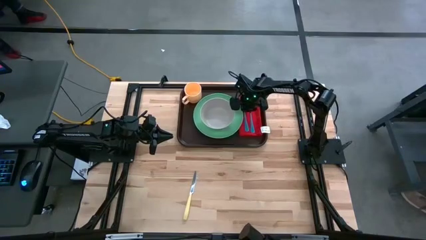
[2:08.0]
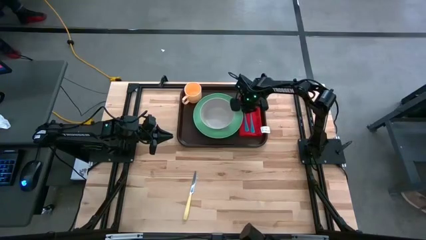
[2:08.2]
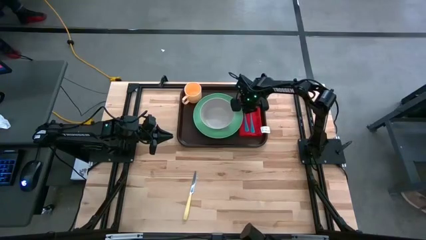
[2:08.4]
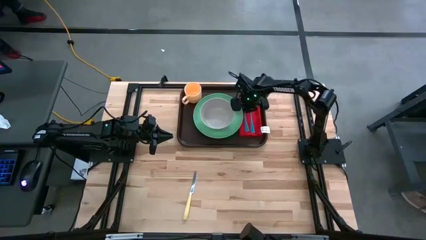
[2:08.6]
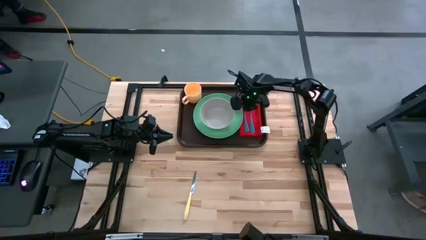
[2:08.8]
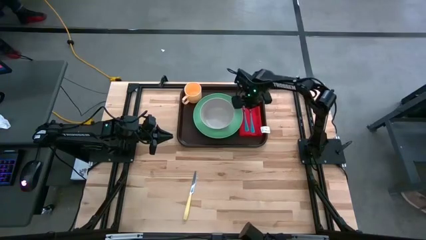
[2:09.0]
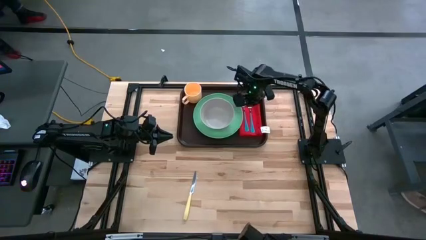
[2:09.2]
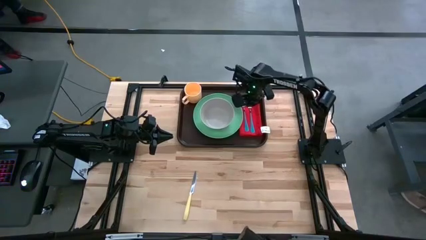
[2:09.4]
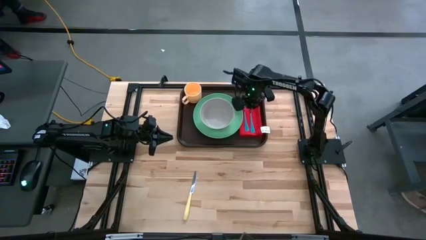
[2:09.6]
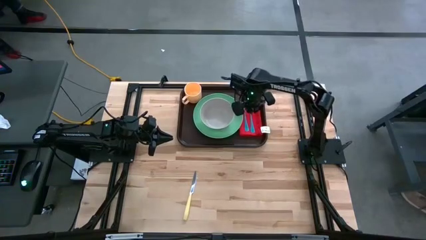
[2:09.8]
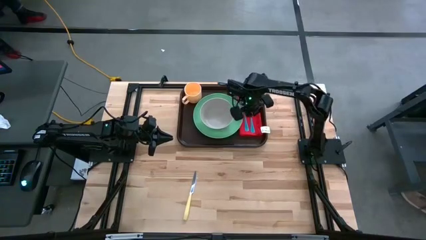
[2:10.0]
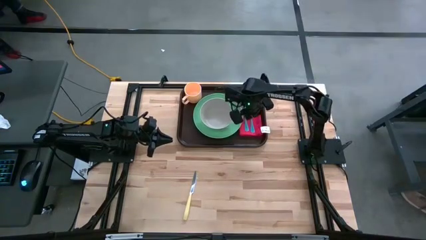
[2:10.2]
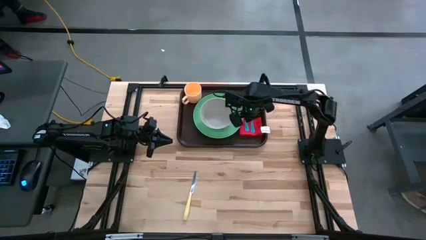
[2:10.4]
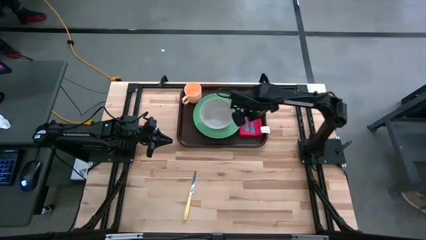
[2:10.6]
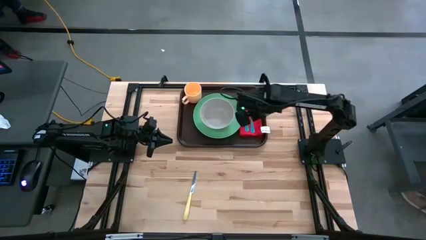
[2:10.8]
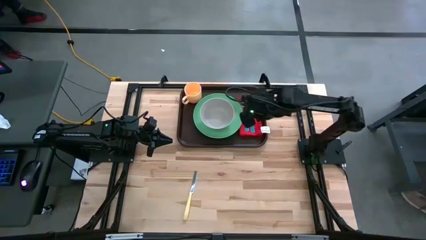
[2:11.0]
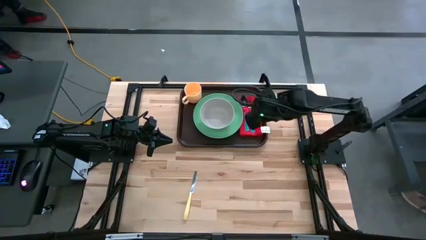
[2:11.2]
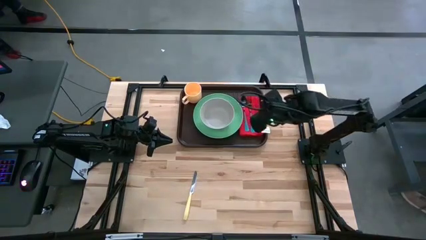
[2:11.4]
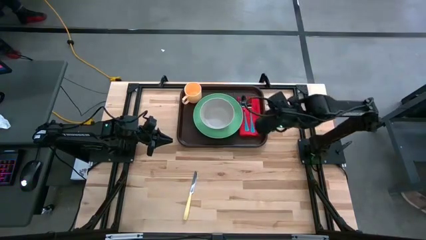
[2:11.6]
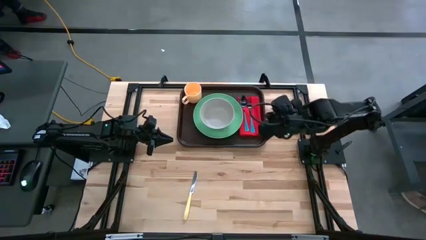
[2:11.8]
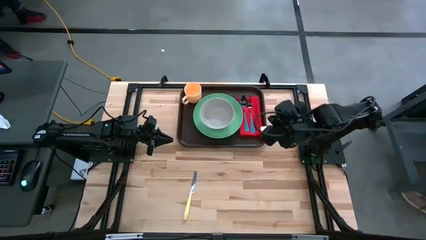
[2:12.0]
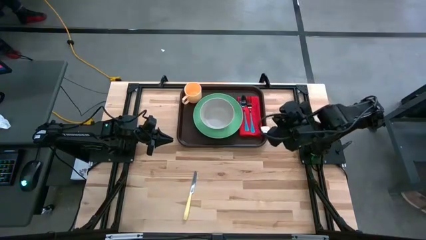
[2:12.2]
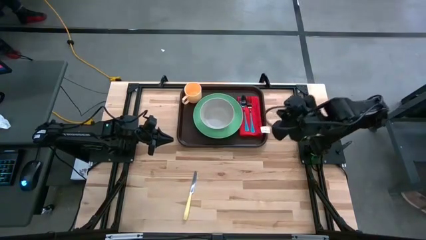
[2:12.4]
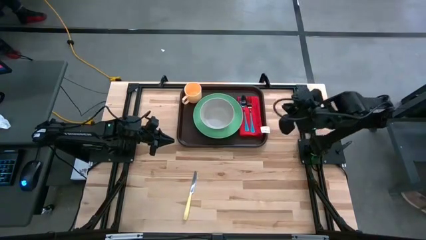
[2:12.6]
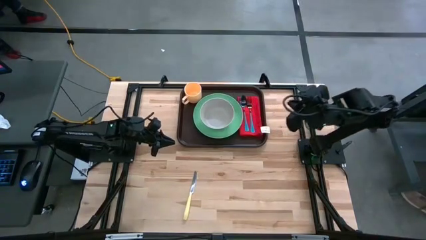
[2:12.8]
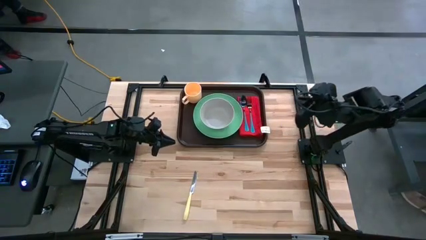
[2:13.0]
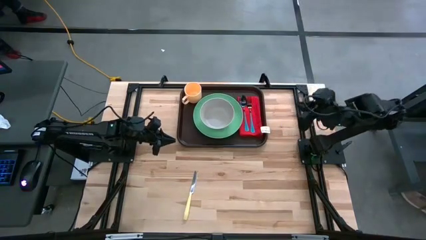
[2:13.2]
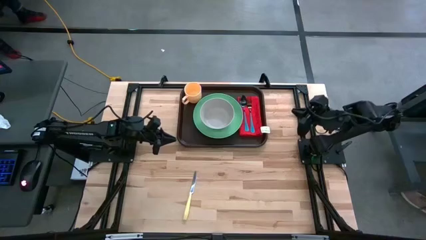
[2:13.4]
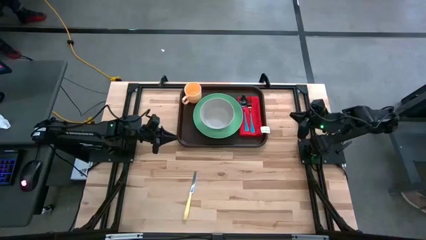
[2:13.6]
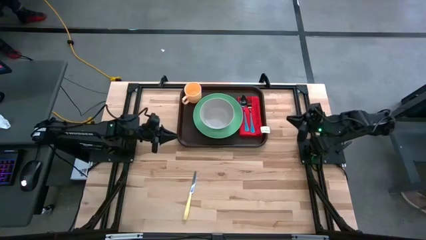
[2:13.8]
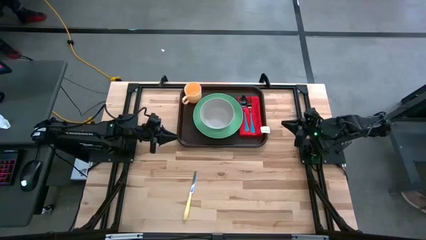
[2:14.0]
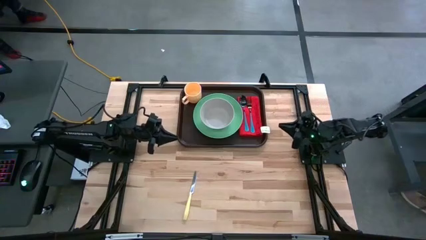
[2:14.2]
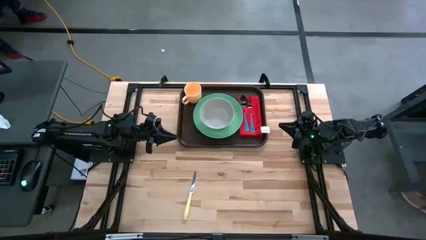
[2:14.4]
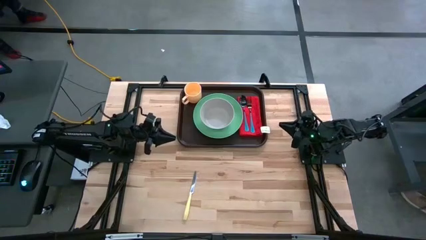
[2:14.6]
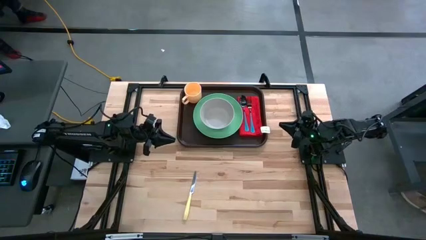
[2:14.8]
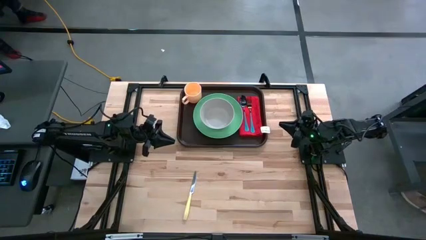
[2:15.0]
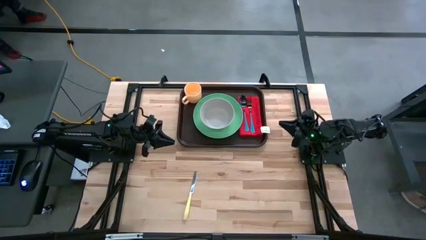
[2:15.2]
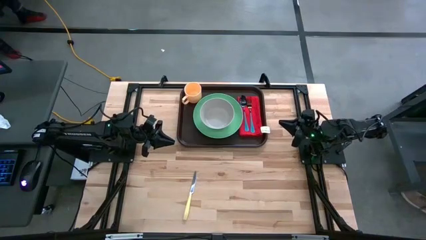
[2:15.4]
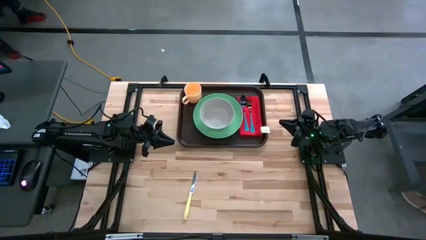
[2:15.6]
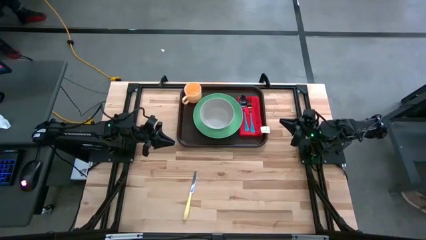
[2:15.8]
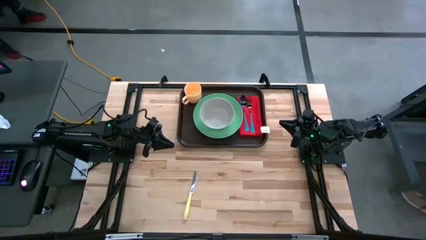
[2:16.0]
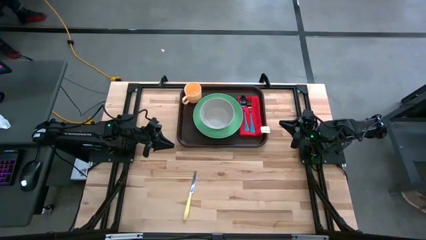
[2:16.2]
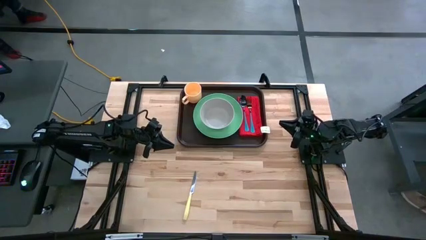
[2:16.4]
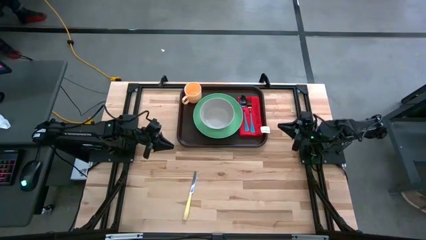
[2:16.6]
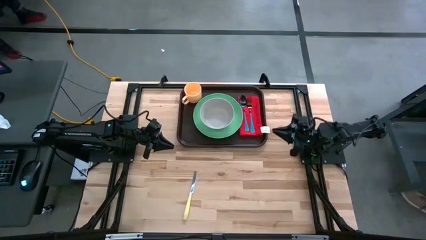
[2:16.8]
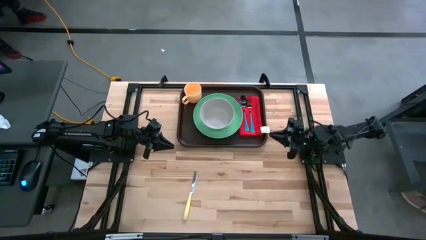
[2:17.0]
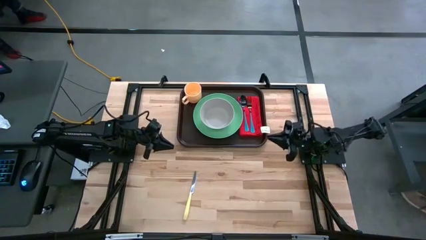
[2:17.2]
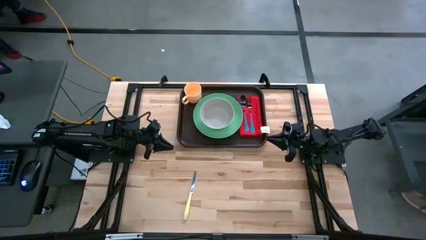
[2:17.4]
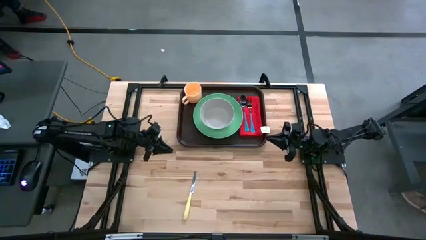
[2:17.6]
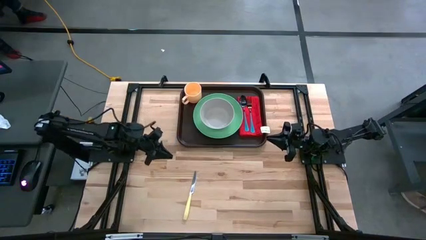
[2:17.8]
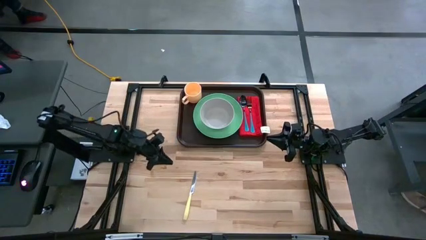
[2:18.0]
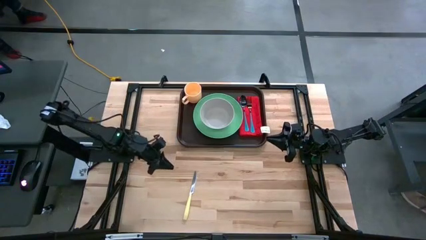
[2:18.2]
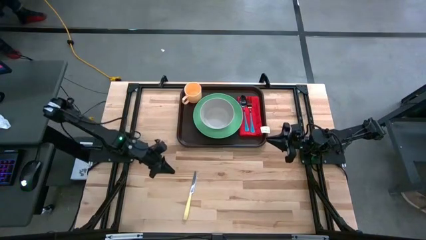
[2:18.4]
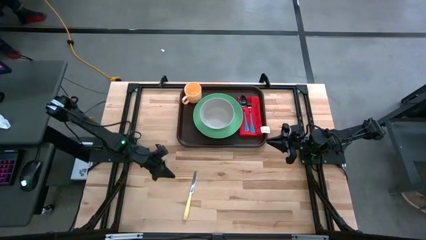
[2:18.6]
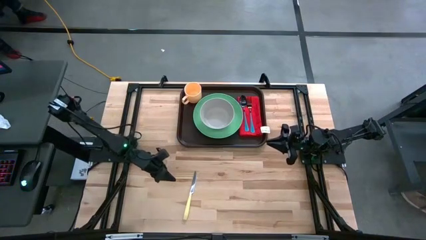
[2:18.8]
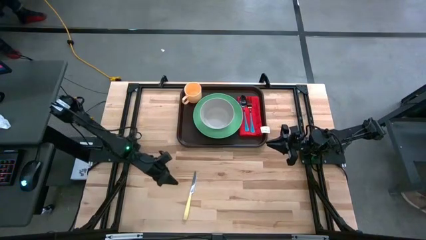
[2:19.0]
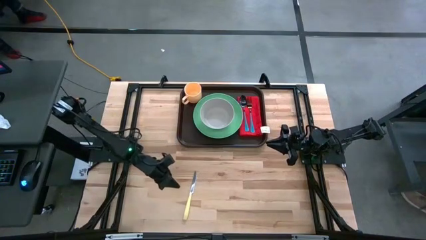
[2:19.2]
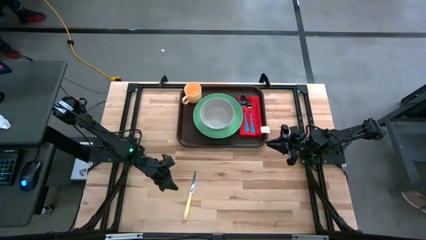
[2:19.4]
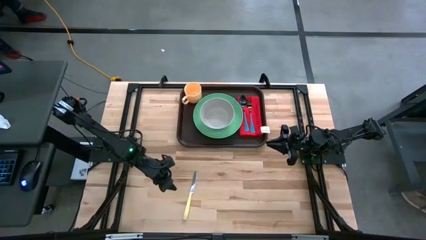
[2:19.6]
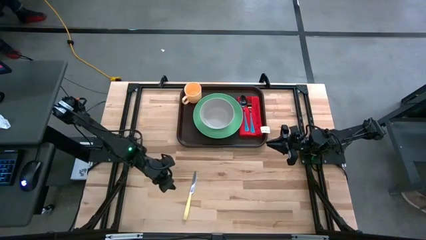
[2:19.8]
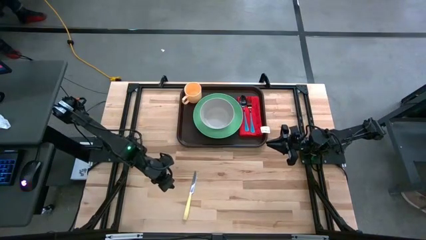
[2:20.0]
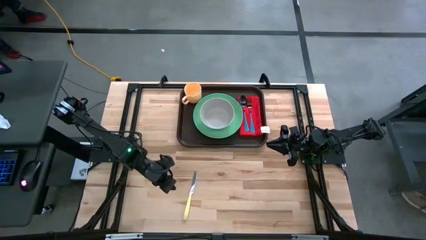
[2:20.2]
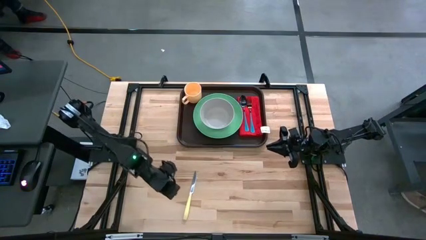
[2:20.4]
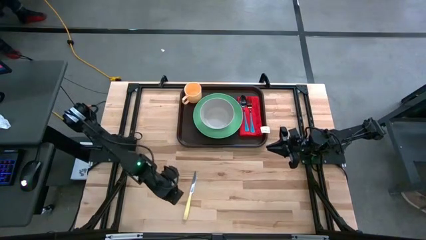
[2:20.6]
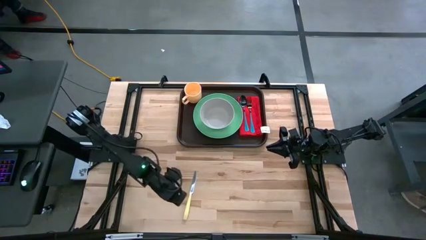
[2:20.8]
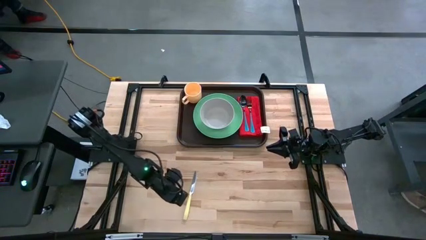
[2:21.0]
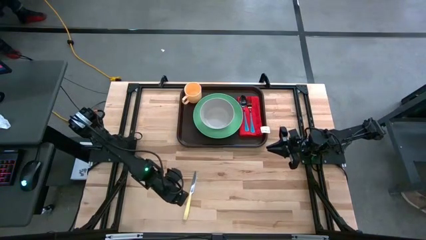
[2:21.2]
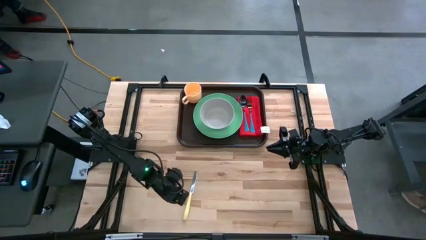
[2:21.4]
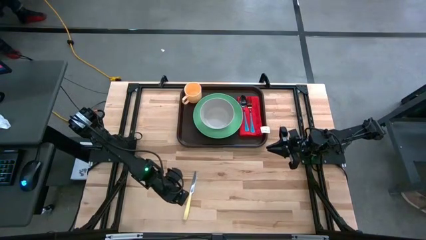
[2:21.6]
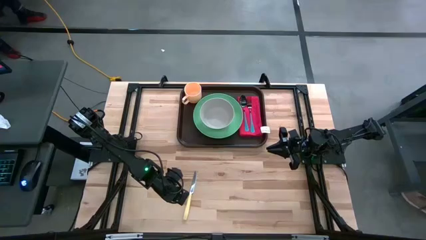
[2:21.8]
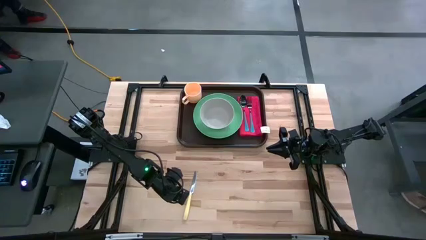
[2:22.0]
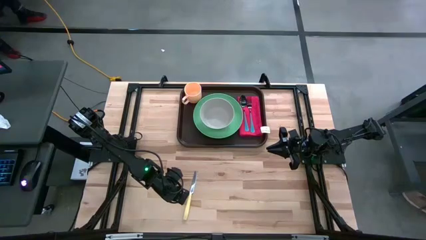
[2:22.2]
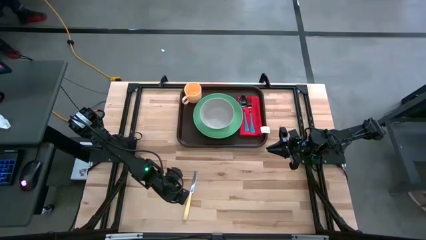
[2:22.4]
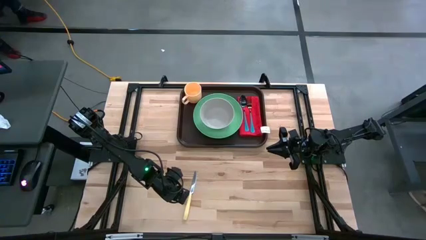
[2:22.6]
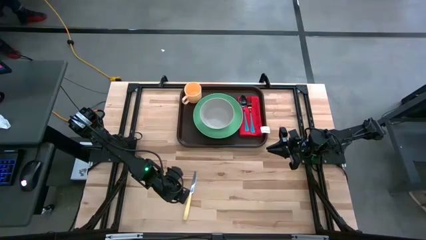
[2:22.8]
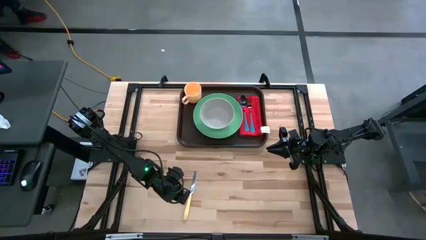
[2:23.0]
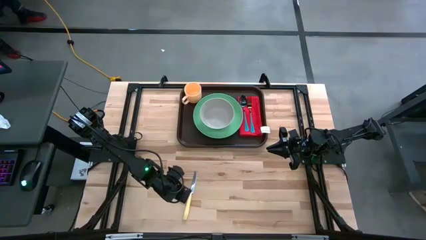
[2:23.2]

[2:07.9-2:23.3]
Task: Set up tray
Put the yellow knife on top of the red napkin to the right of the blue fork
